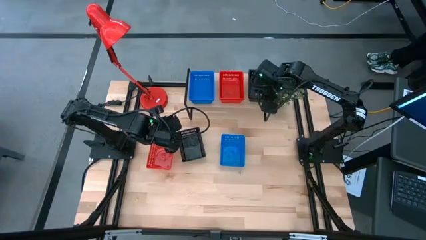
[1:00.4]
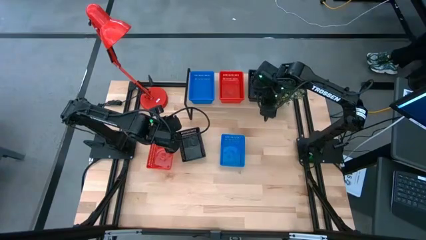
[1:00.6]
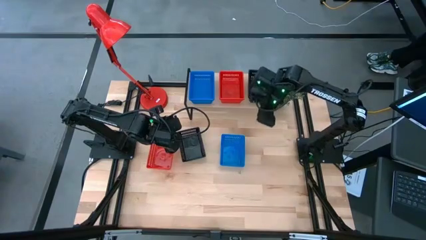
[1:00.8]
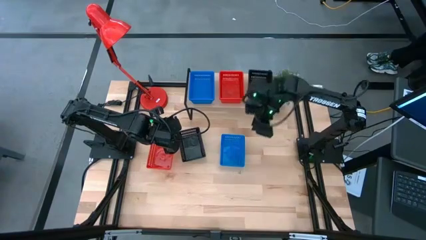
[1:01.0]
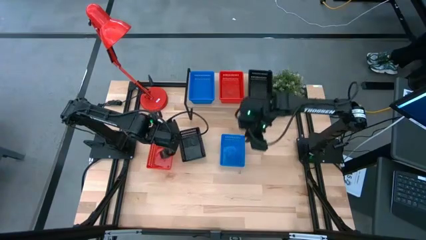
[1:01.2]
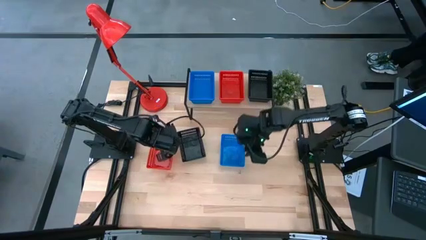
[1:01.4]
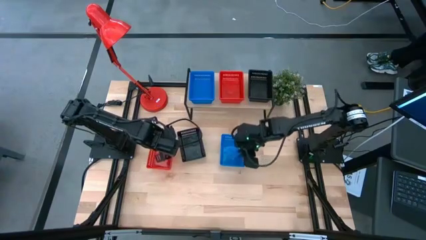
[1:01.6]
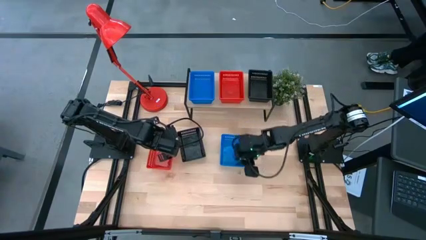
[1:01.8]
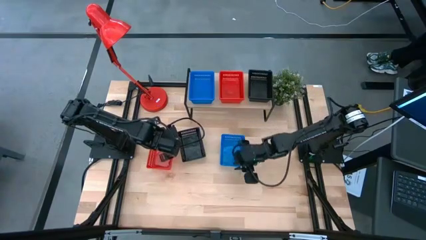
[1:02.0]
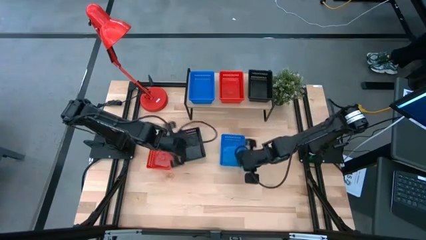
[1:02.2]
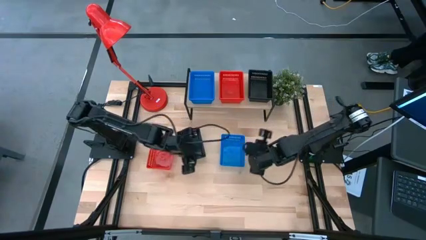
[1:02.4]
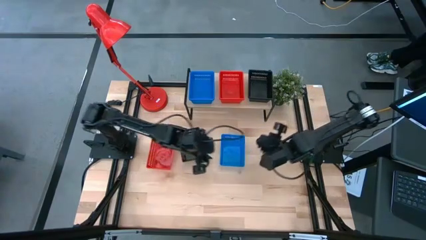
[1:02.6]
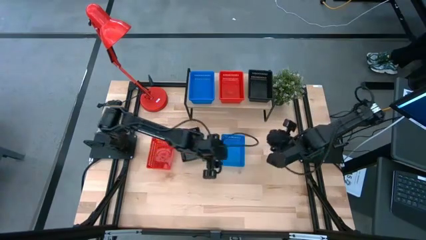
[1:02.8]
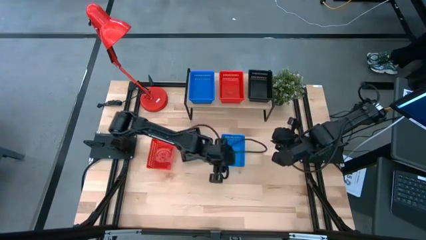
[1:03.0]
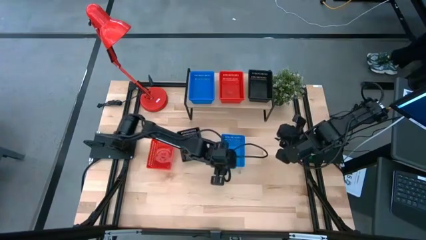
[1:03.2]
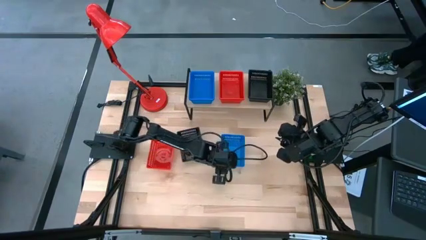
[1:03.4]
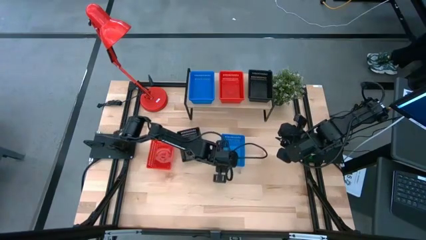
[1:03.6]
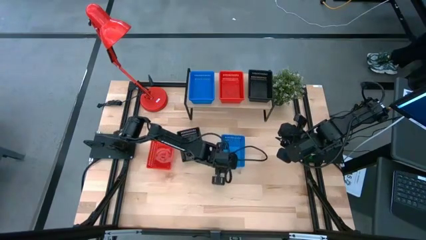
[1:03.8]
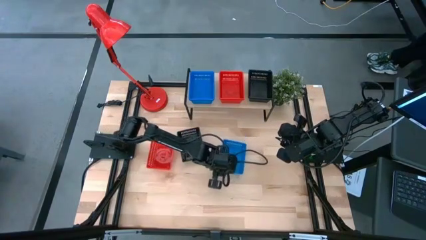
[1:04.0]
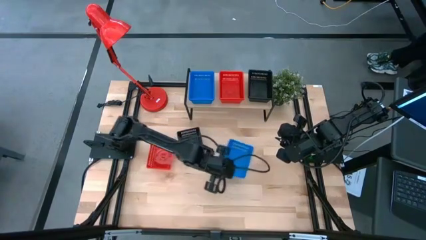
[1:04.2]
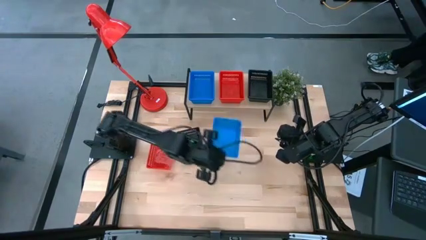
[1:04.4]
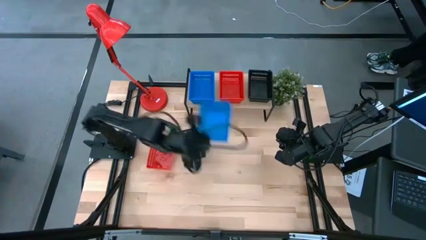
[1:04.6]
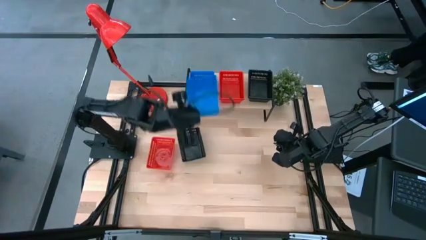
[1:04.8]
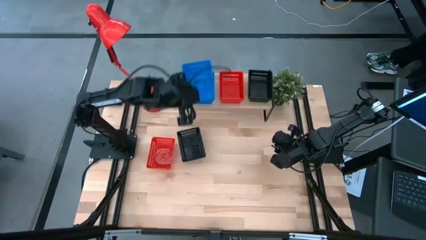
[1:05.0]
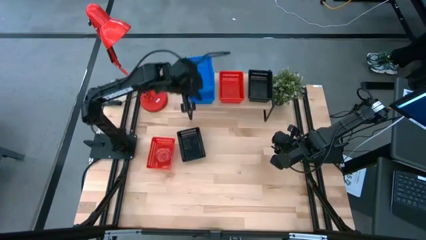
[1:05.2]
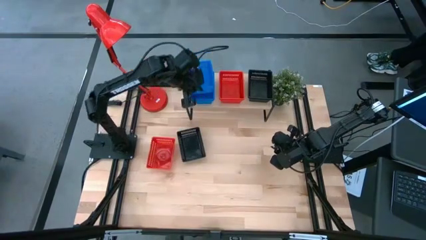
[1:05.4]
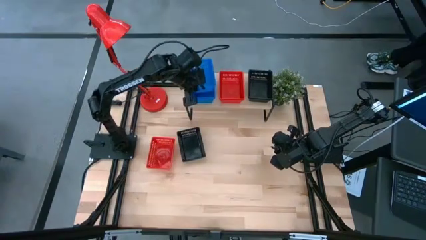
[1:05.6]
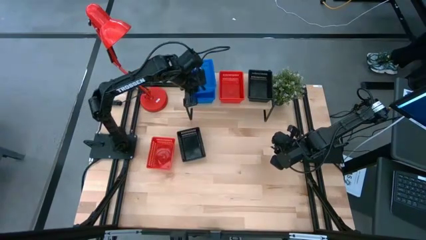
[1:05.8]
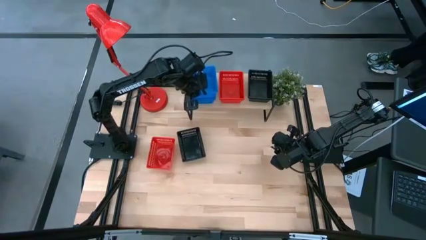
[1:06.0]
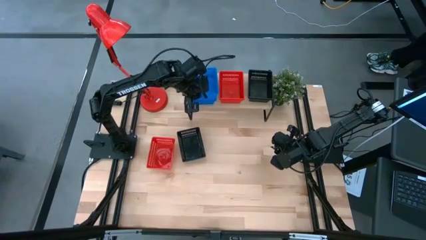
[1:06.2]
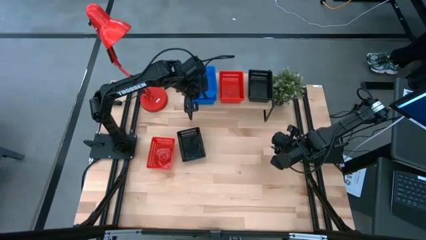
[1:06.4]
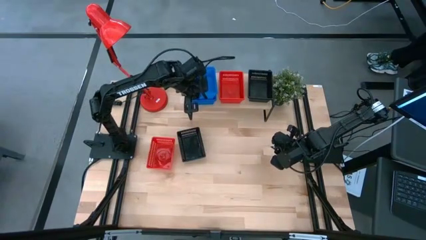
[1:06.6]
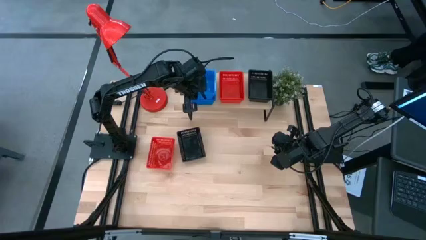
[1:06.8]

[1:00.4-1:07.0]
Task: Stack baskets on shelf by color
Stack the blue bin on top of the blue bin on the shelf

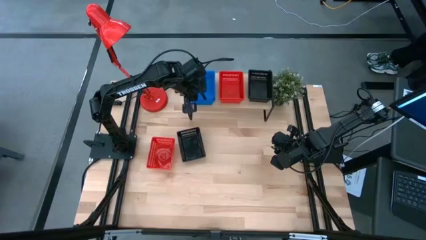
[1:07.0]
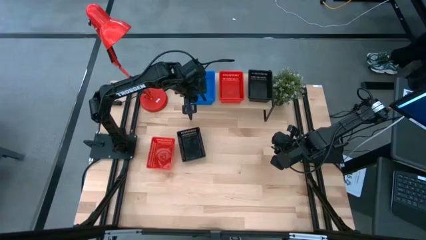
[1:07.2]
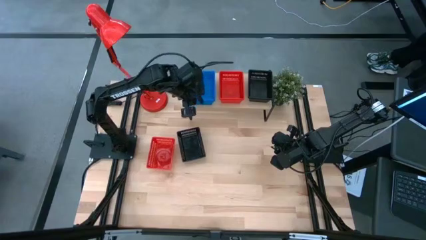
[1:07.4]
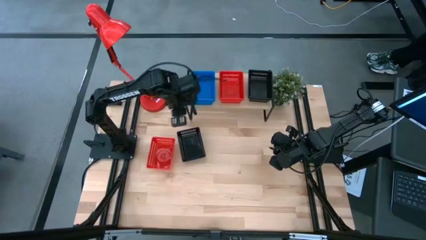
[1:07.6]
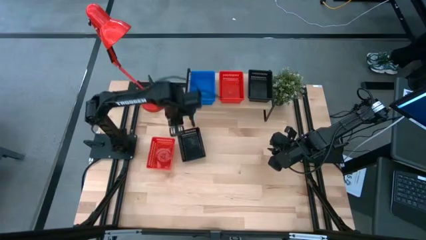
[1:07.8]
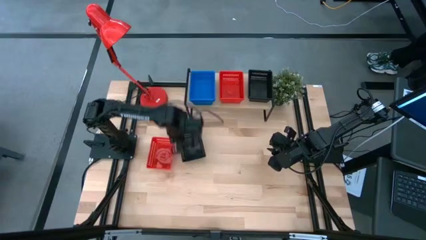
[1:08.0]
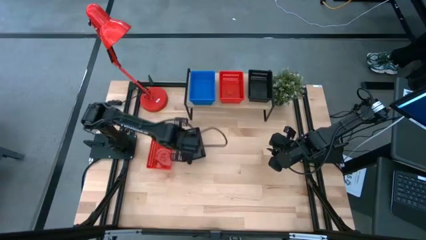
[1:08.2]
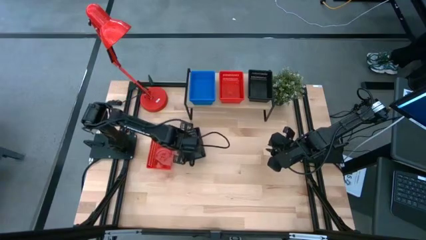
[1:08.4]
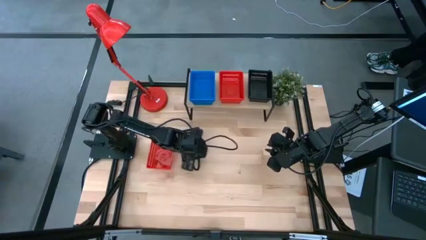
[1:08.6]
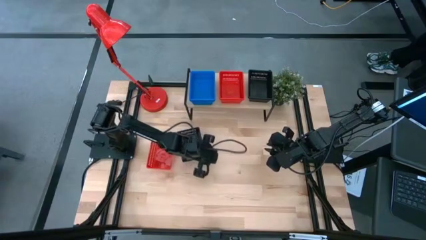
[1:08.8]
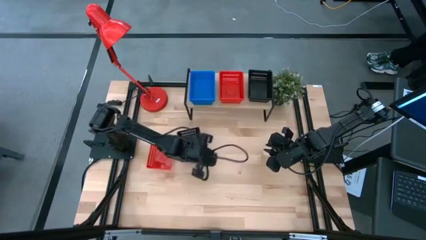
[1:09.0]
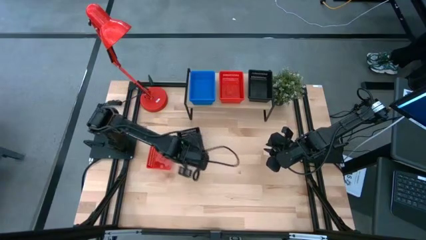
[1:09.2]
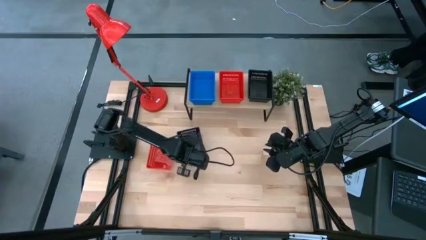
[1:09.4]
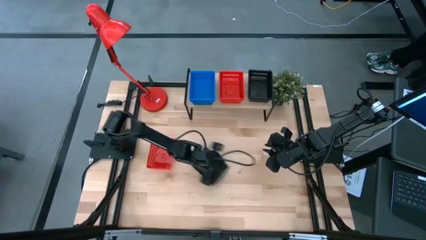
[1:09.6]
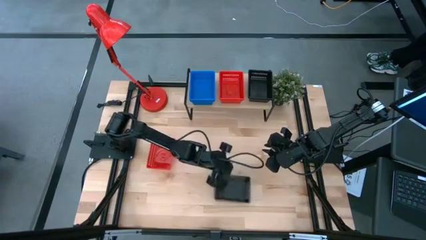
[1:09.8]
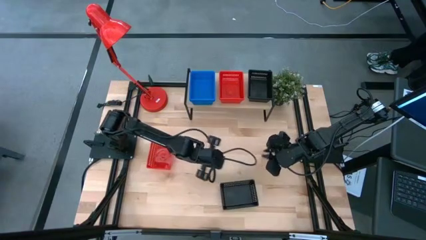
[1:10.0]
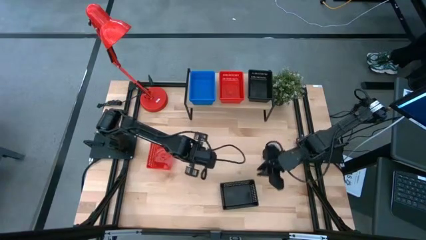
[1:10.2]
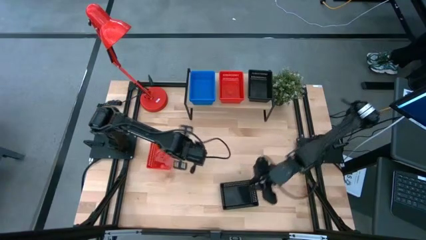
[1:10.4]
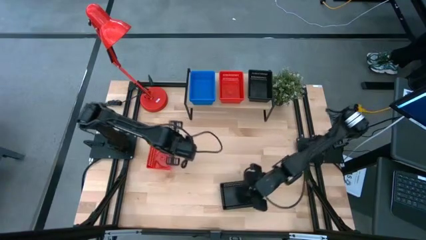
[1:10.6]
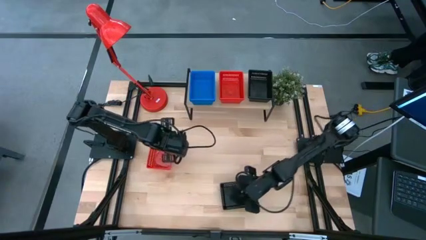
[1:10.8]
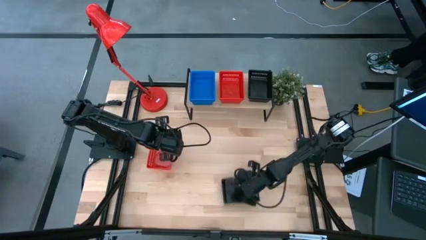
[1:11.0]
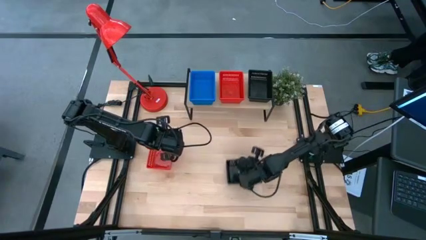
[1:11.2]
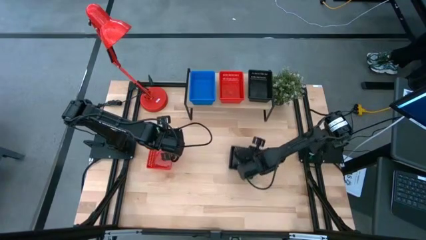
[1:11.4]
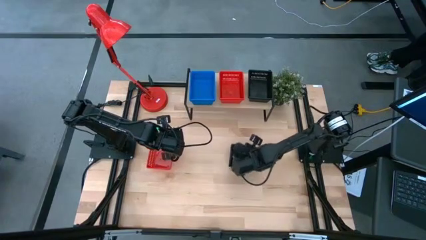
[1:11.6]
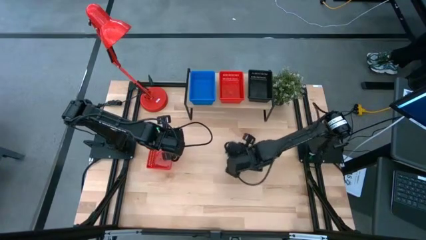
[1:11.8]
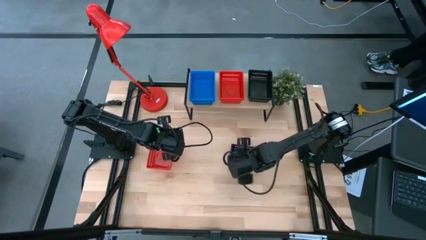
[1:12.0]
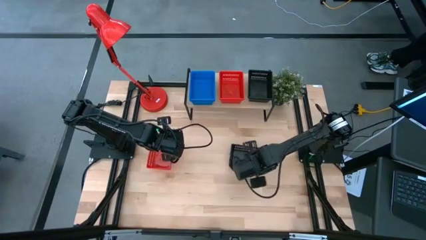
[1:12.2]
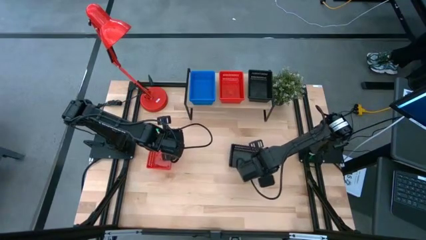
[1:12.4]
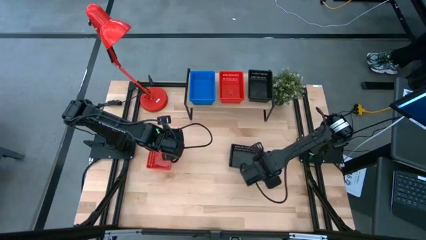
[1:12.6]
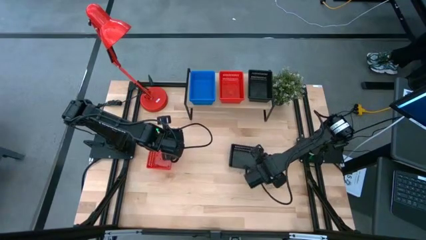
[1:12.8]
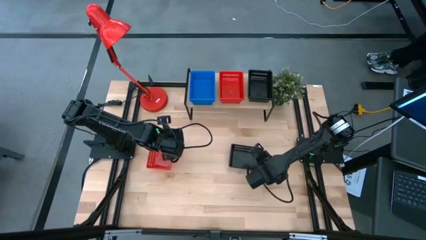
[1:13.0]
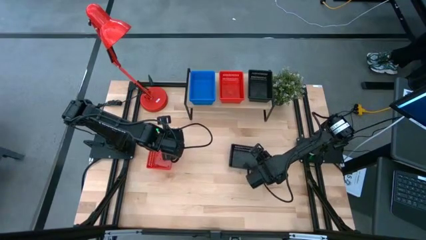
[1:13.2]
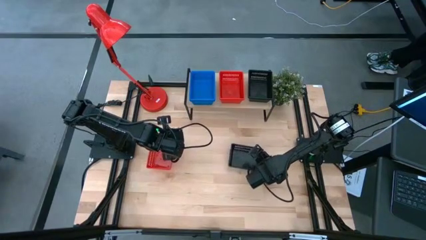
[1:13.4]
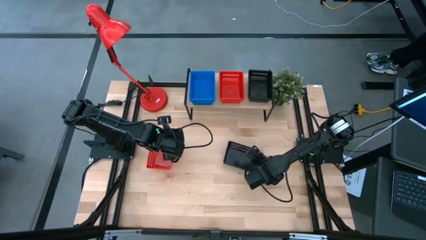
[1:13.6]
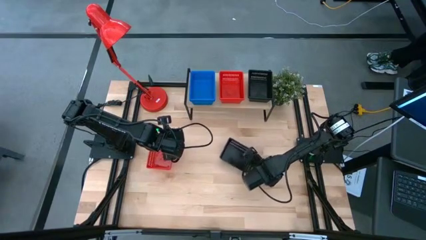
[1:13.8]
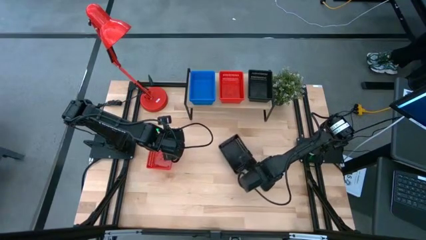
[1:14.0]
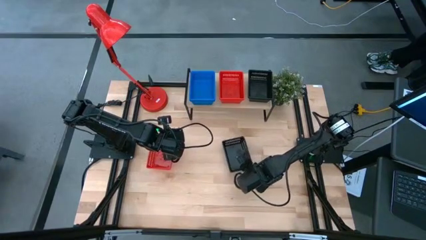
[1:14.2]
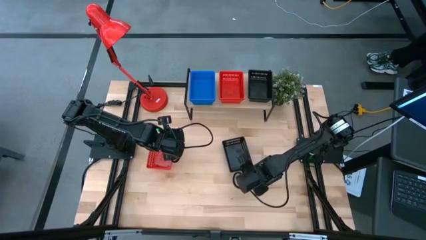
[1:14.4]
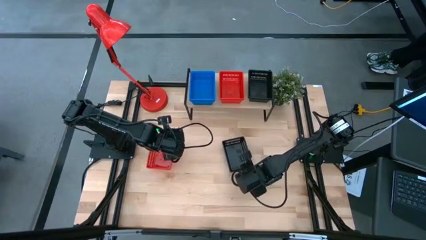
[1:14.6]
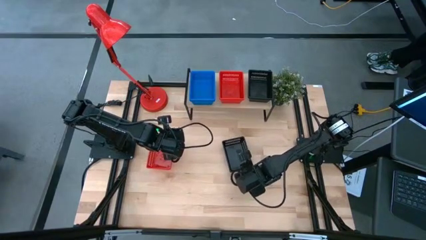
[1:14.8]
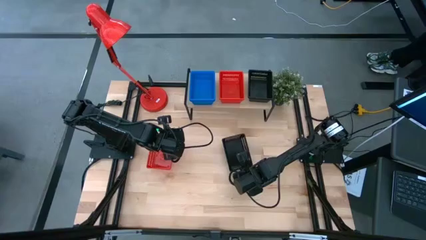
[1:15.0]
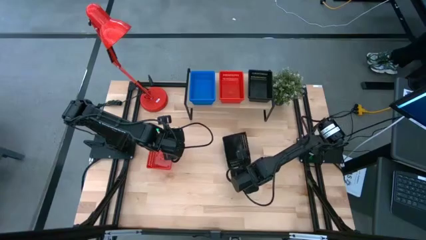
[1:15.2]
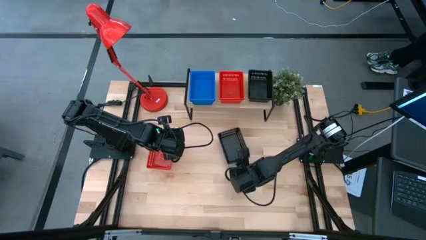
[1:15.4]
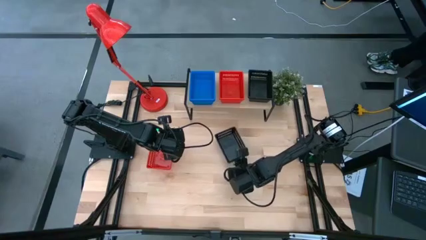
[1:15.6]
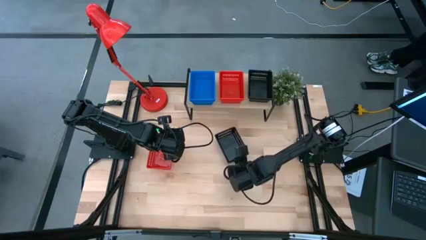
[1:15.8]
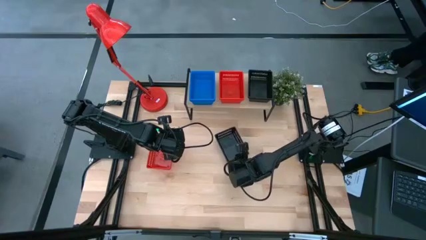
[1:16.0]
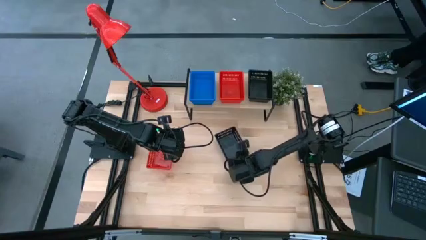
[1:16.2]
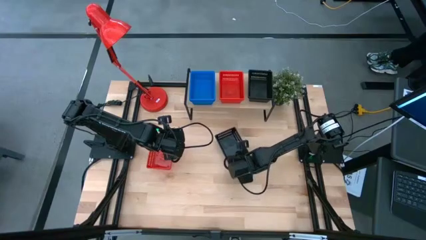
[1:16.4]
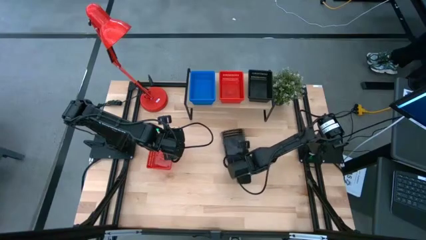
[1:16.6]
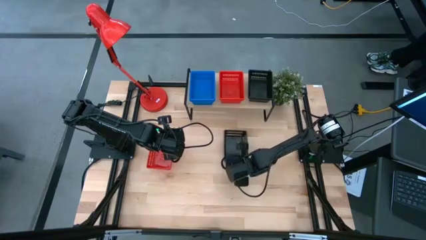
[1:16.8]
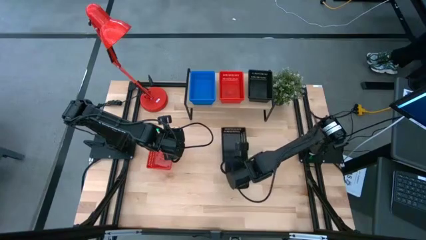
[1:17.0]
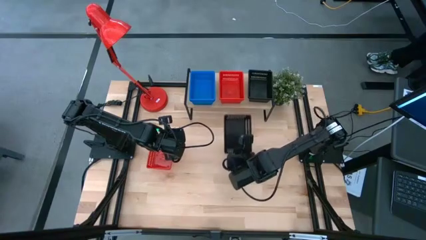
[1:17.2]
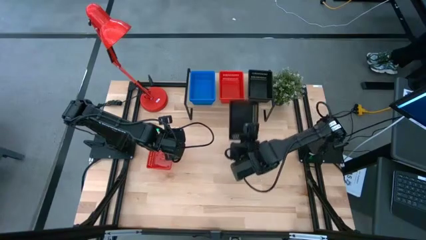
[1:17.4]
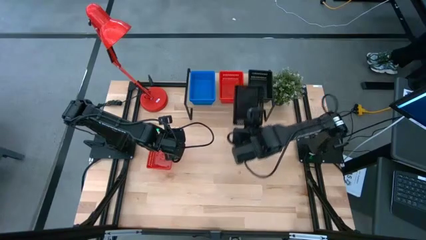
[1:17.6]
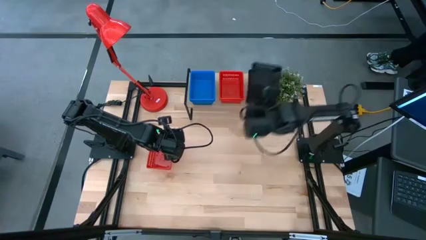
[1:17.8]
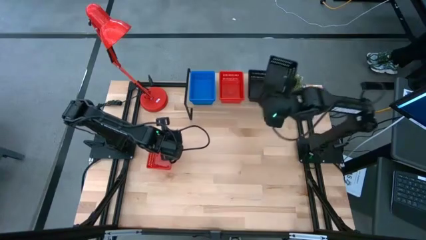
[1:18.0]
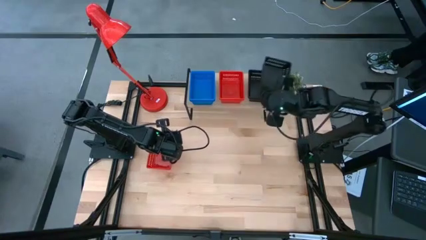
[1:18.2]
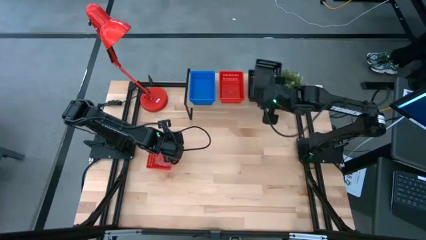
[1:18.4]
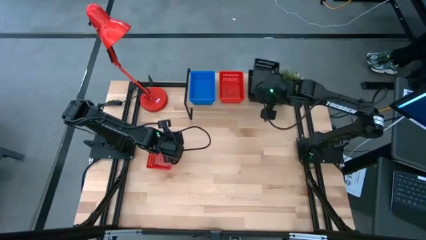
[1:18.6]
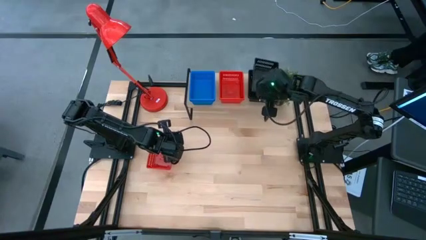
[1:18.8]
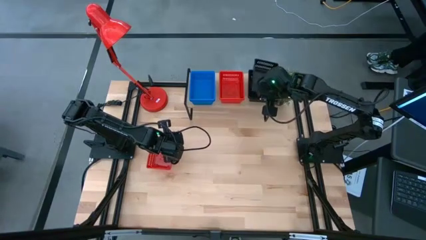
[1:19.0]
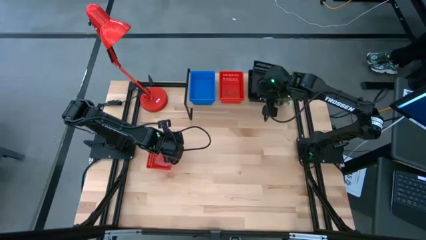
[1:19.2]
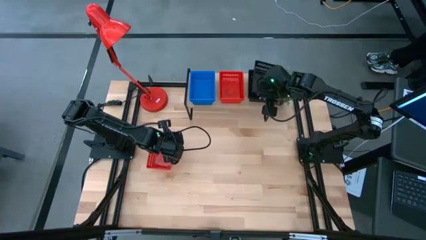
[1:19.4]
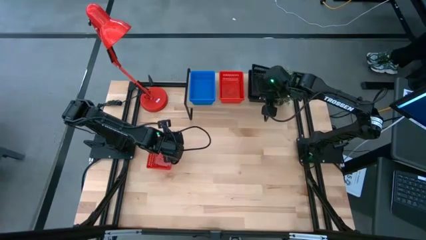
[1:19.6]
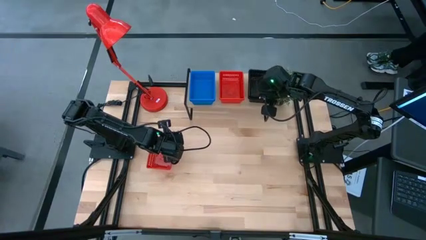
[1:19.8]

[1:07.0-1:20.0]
Stack the black bin on top of the black bin on the shelf
